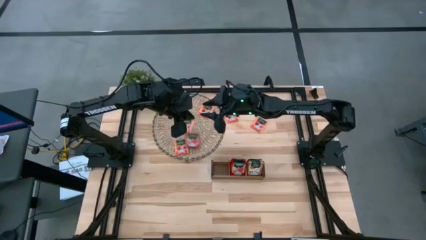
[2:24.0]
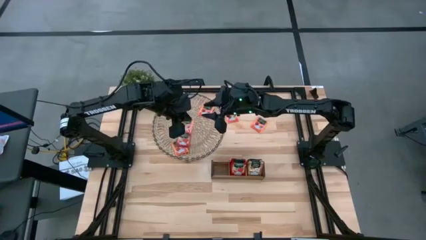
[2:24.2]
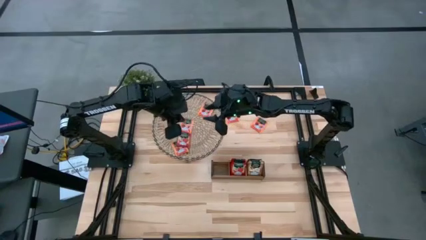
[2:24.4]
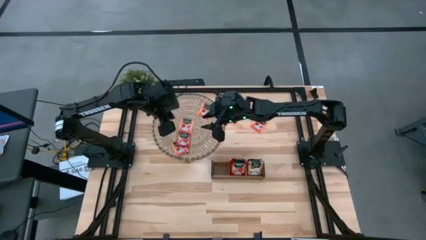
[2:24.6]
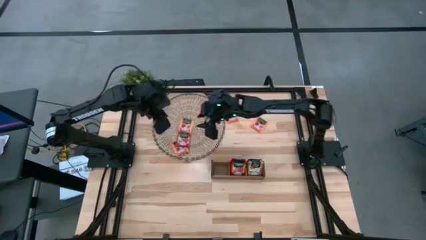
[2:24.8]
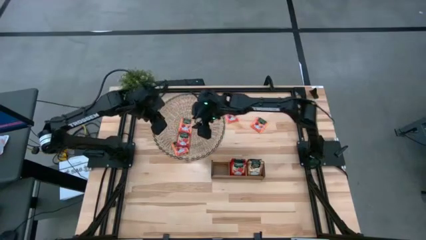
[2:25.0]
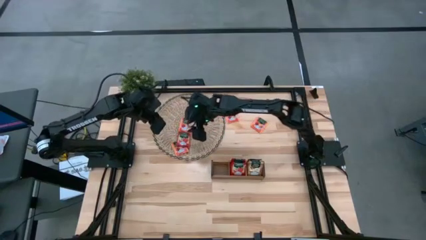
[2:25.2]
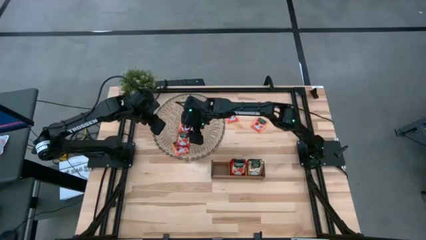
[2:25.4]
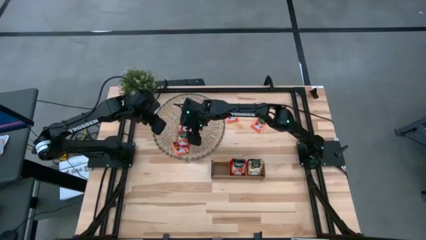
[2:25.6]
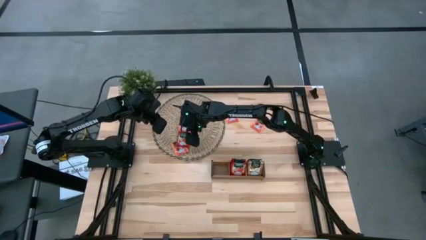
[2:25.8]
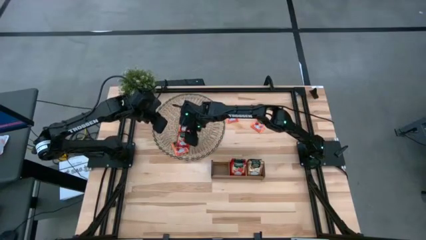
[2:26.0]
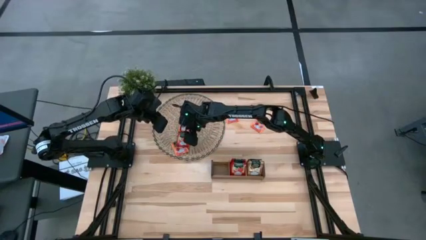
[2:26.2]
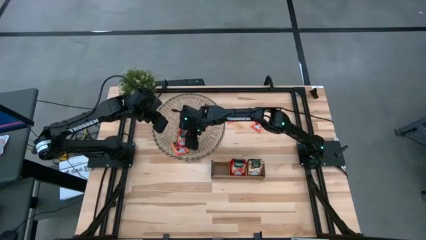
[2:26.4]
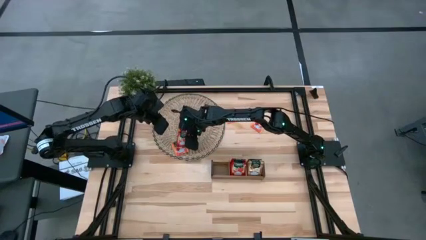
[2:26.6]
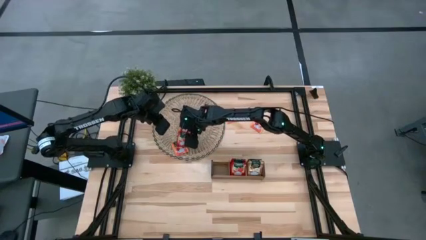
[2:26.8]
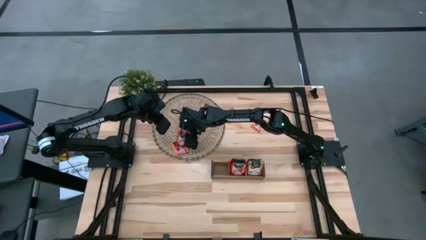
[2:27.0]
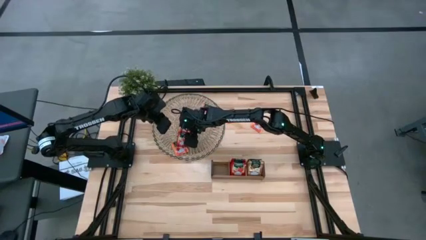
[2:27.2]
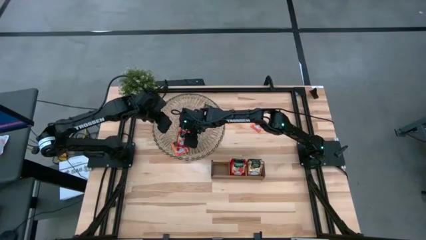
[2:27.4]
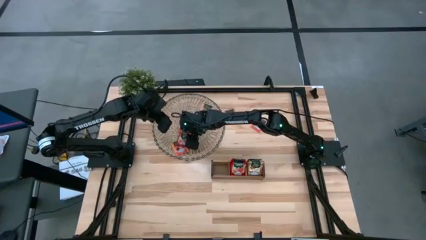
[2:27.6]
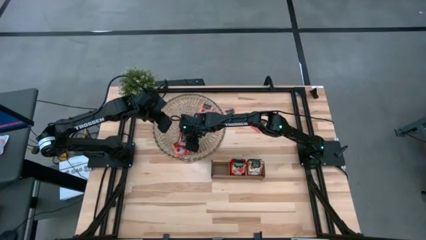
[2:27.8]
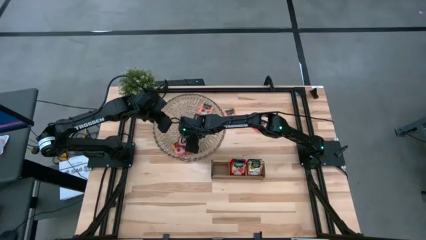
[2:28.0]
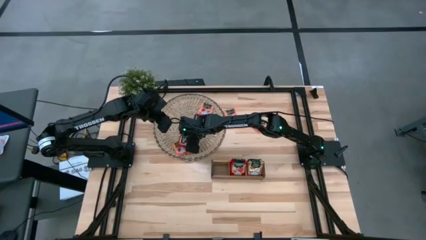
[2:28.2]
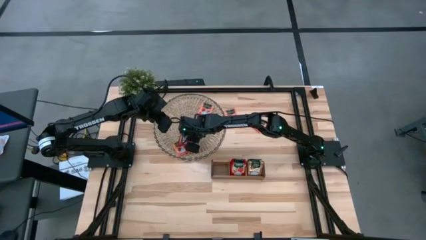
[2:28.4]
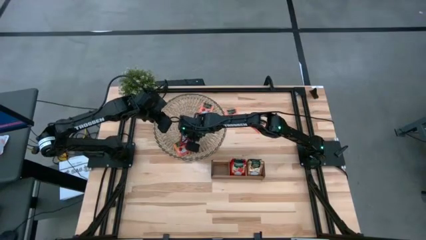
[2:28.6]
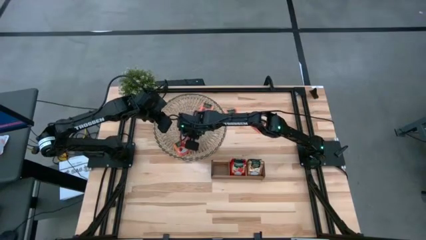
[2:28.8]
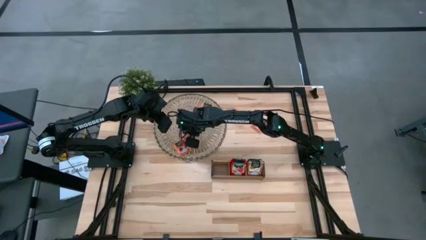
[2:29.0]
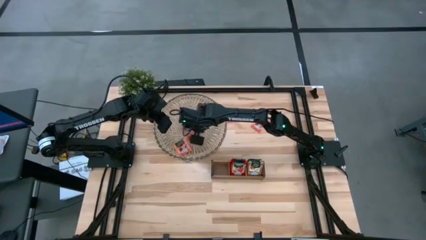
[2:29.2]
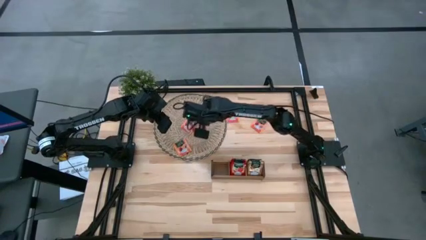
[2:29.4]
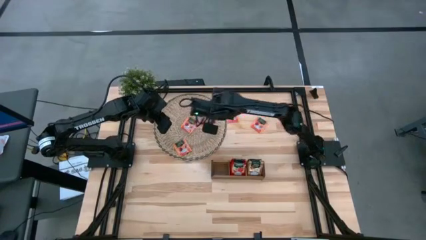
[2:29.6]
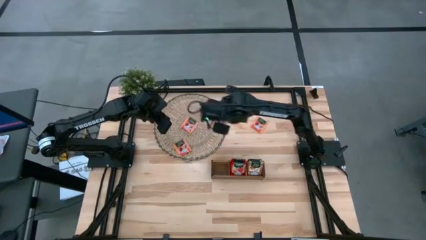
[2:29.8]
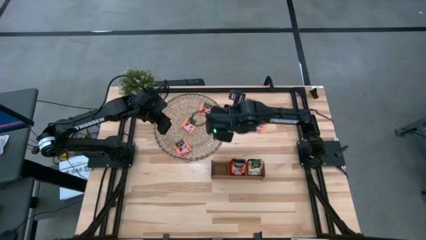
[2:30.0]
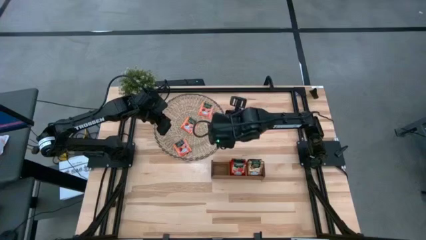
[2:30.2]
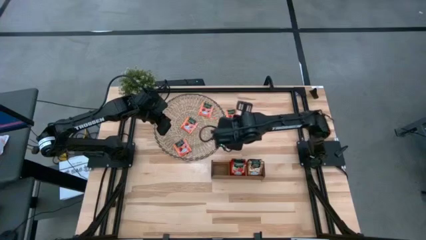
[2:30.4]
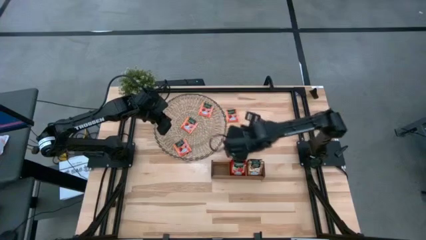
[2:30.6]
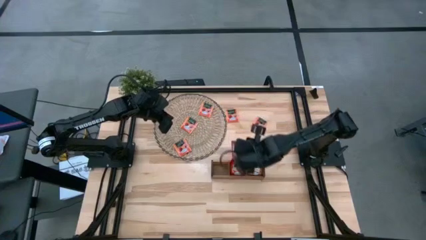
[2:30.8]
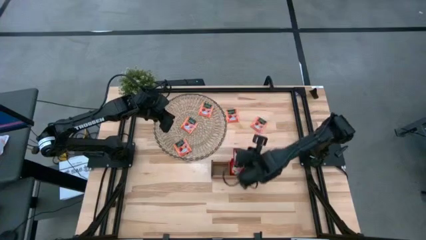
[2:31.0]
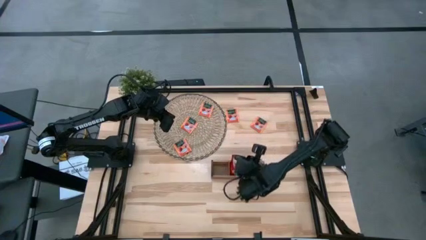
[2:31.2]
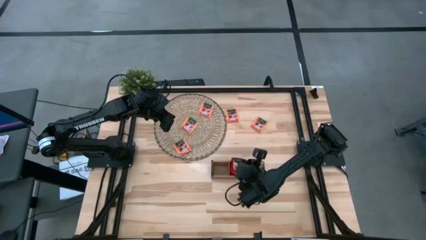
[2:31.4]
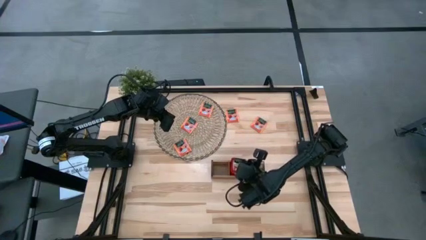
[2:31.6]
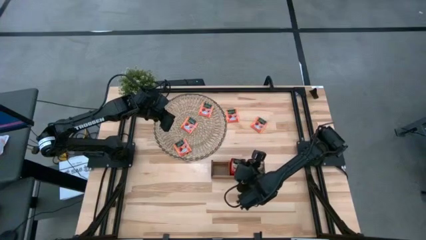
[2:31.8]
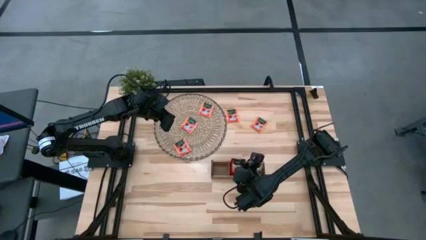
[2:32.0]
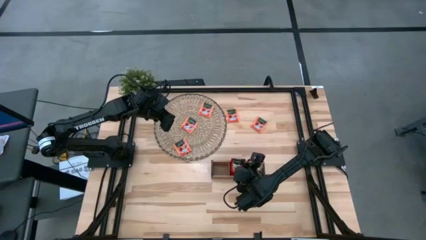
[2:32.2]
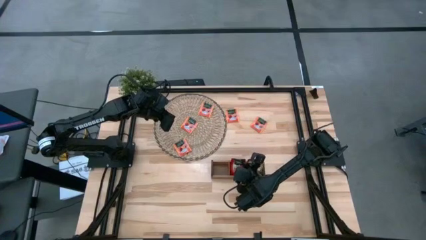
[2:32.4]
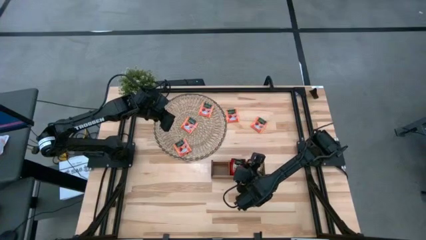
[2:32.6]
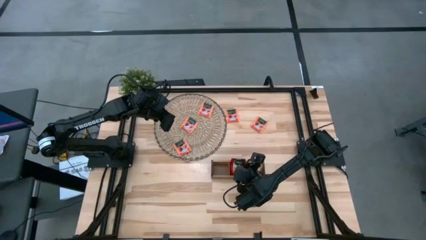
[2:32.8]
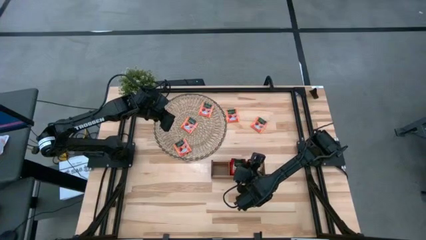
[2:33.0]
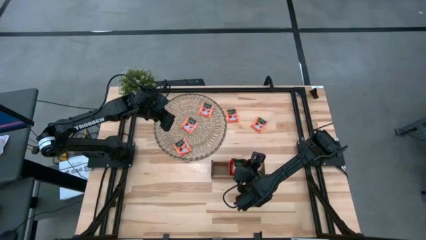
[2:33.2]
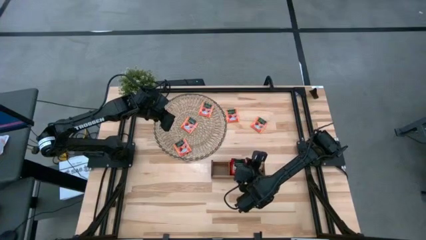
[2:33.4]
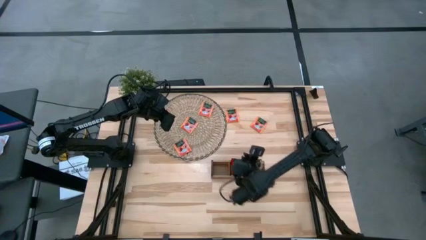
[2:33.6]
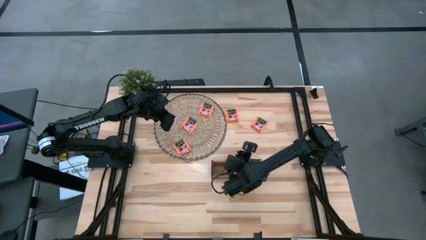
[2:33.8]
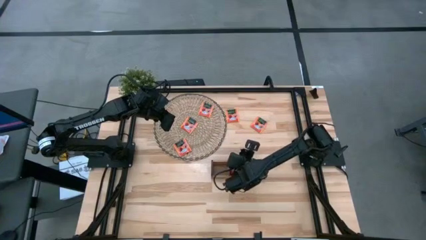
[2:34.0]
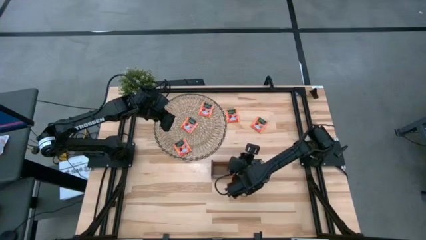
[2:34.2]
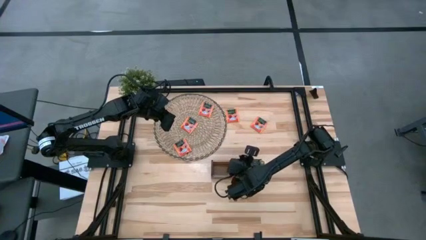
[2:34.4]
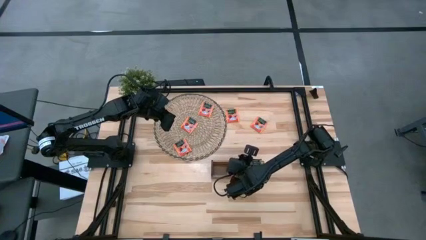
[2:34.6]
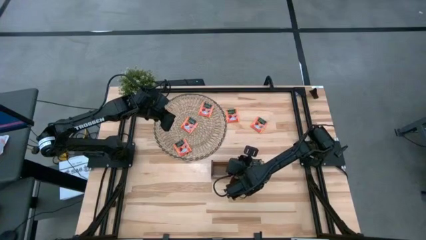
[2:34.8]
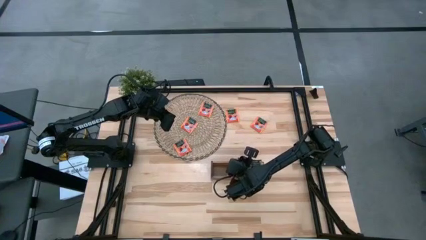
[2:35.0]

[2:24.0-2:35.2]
Task: Pick & Place Tea
Put the red tea bag into the middle slot of the wooden organizer

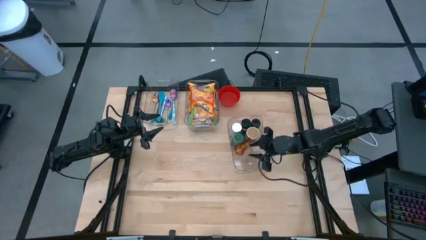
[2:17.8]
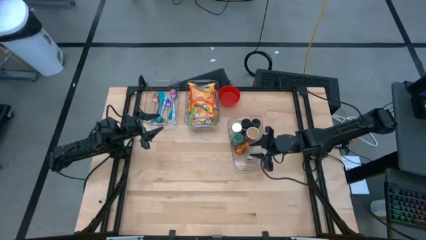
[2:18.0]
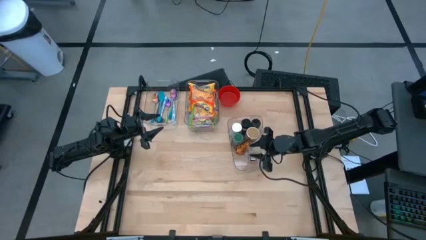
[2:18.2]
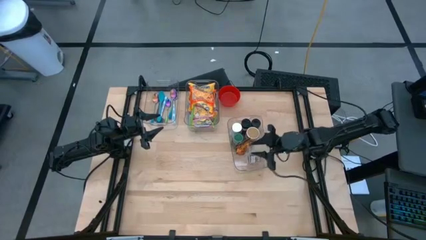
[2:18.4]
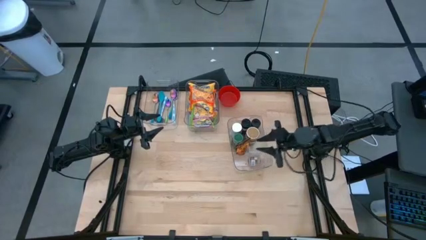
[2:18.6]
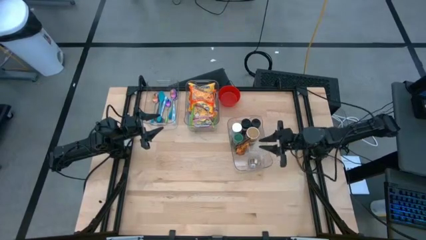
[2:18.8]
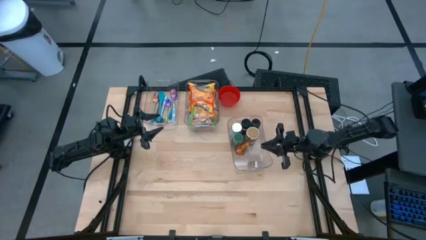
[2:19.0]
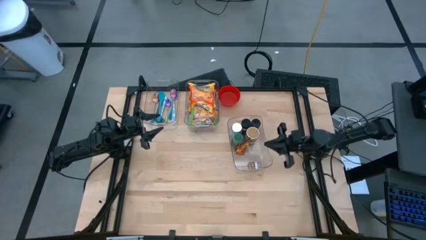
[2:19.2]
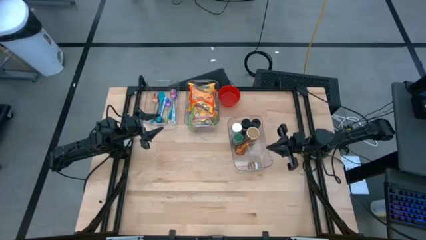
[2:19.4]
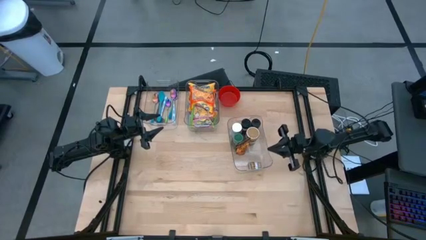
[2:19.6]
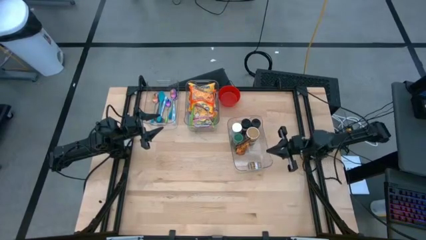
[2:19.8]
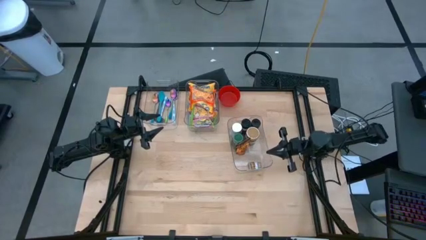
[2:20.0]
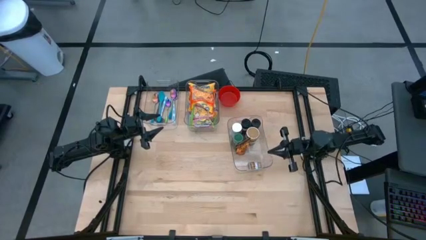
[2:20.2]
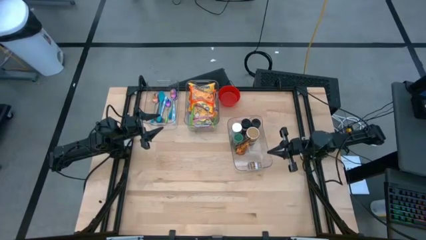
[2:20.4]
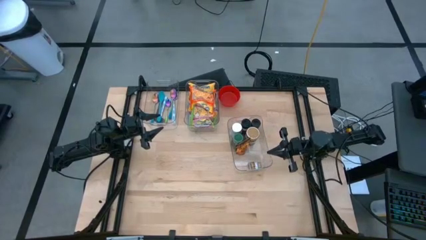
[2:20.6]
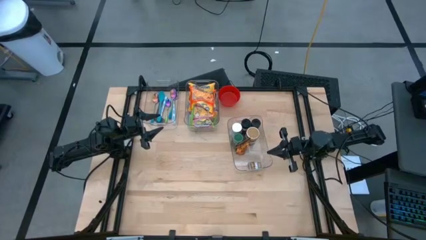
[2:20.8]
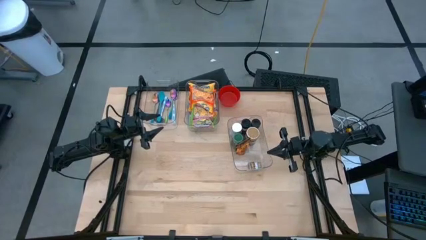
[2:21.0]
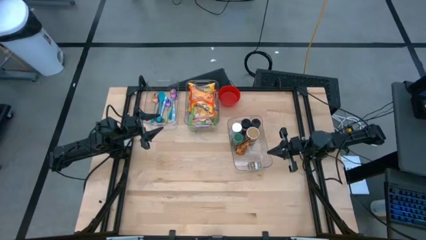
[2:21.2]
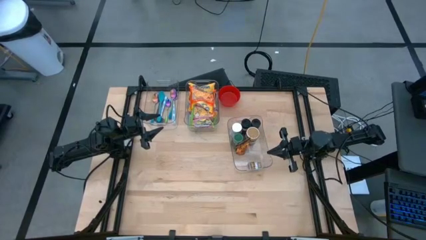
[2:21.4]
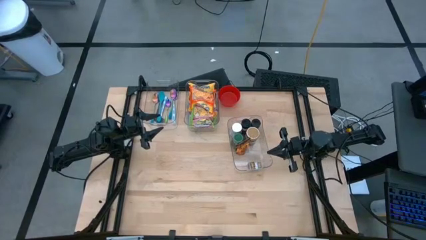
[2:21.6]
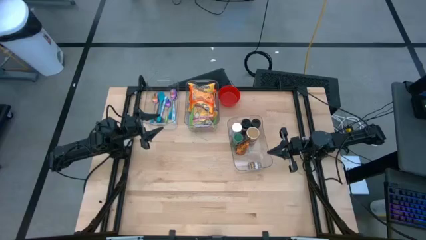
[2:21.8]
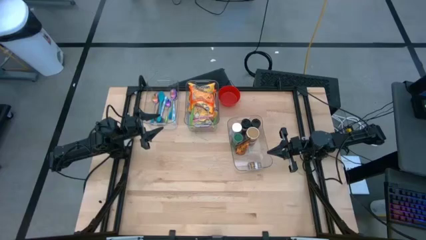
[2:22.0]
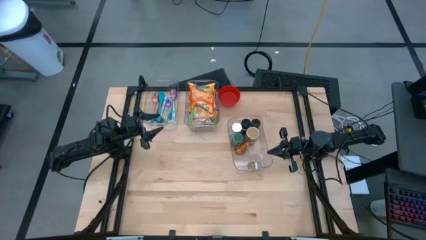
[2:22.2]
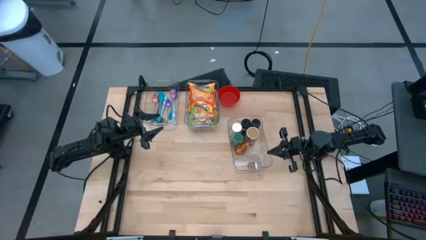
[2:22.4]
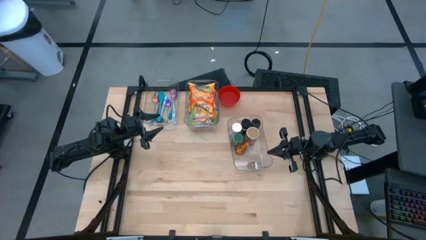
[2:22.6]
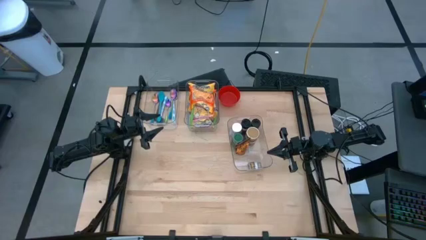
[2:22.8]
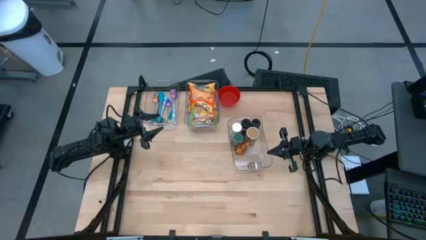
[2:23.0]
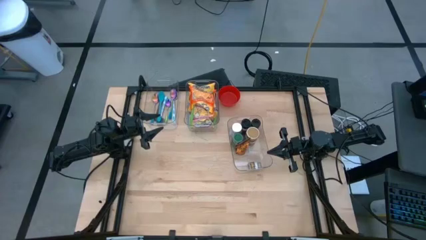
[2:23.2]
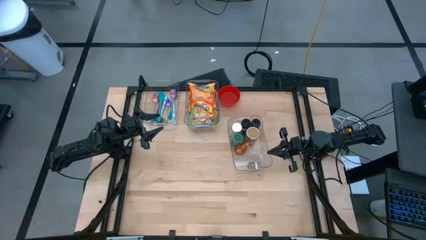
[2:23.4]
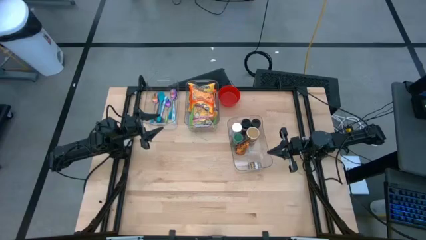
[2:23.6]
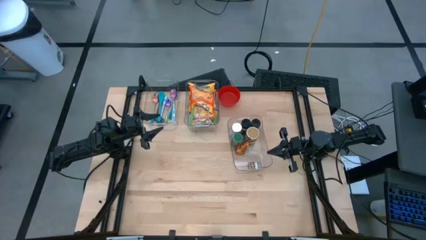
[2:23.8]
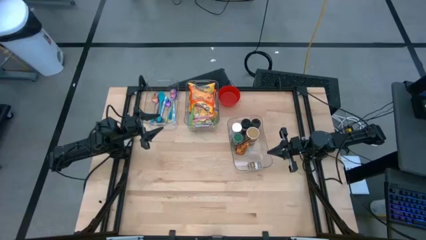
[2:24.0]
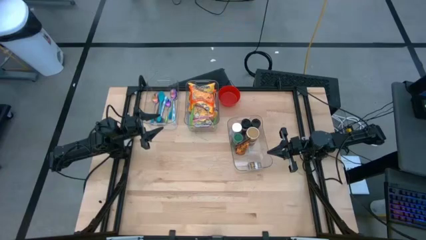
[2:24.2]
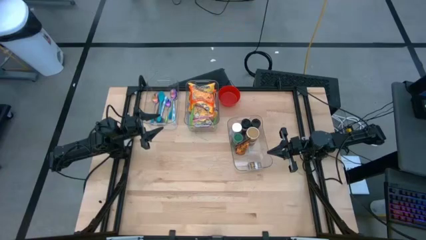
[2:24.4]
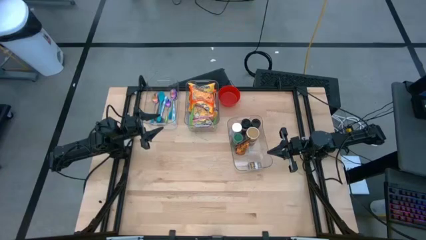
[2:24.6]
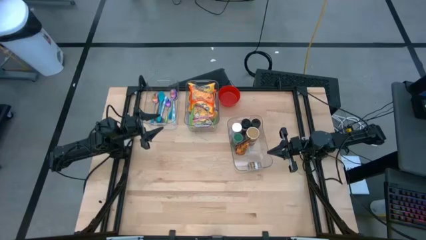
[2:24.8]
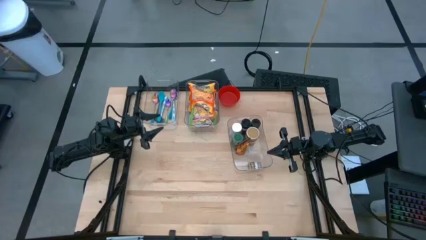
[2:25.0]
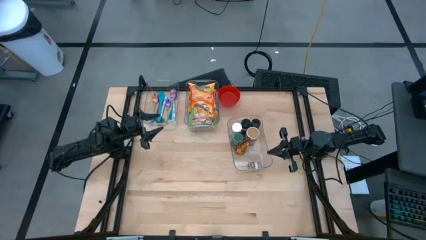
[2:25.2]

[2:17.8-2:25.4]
Task: Pick & Place Food Item
Return to Home Position
